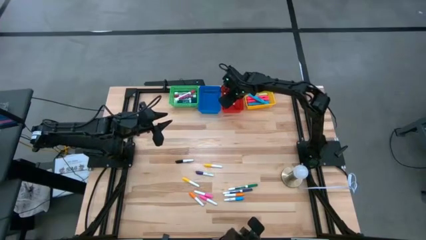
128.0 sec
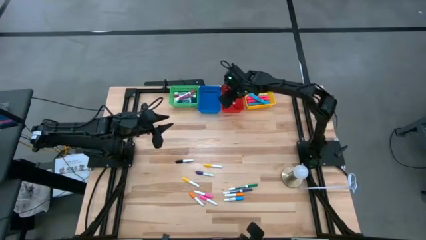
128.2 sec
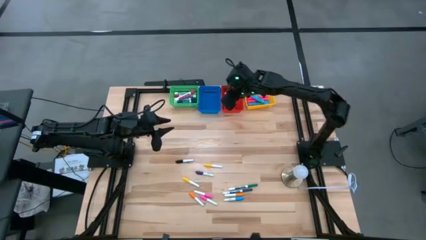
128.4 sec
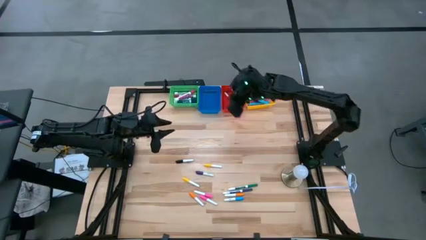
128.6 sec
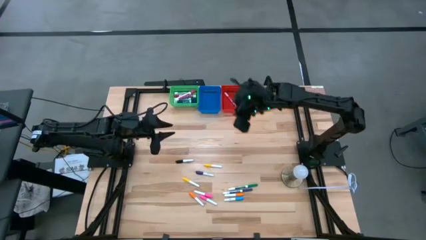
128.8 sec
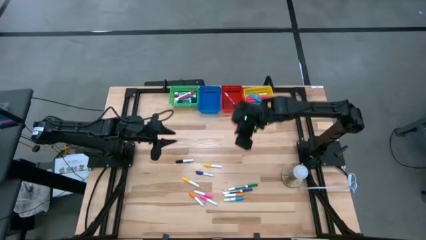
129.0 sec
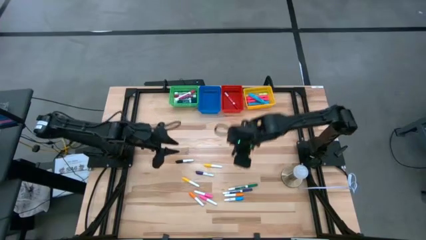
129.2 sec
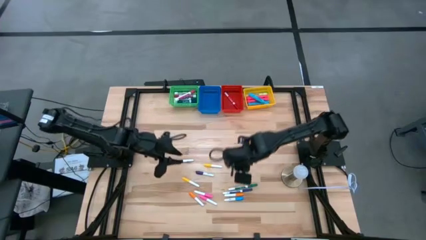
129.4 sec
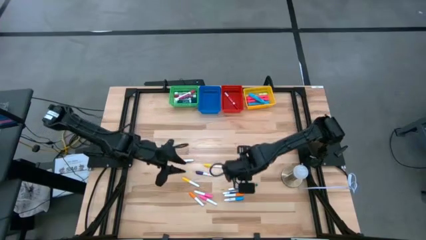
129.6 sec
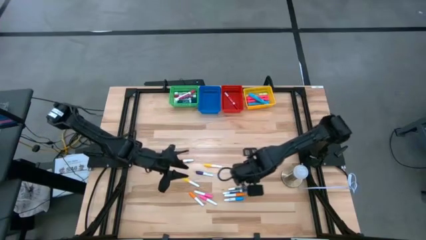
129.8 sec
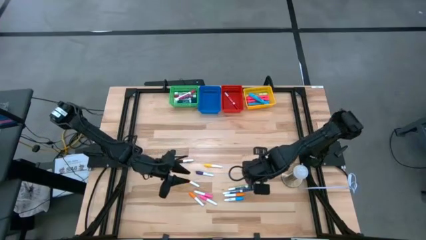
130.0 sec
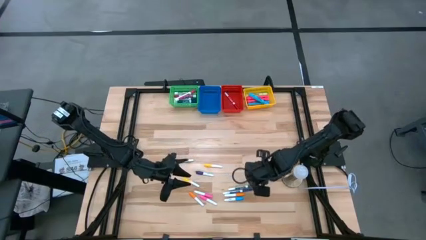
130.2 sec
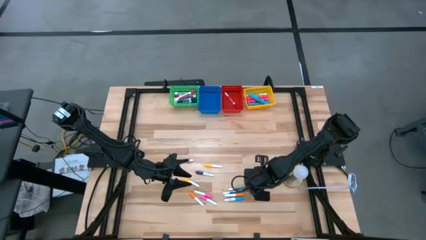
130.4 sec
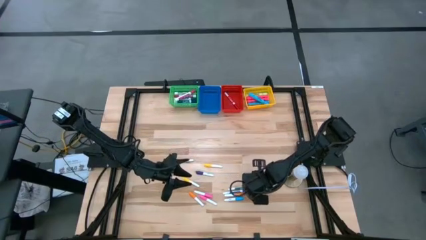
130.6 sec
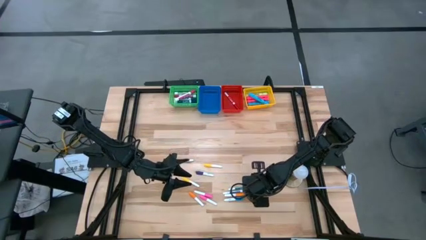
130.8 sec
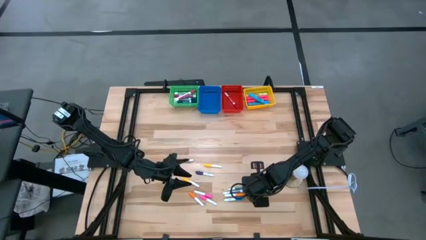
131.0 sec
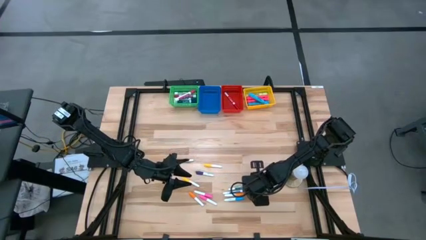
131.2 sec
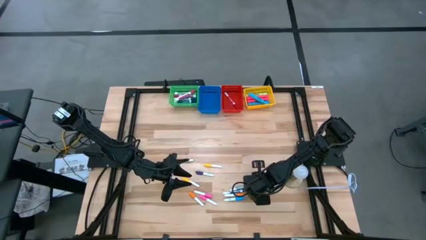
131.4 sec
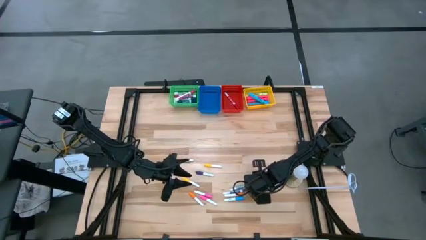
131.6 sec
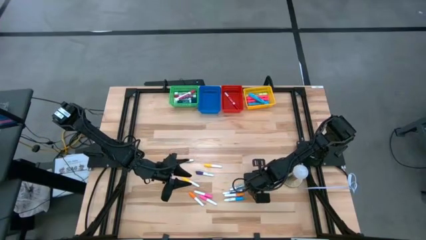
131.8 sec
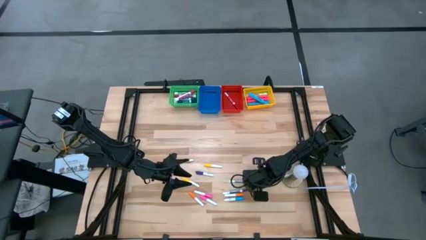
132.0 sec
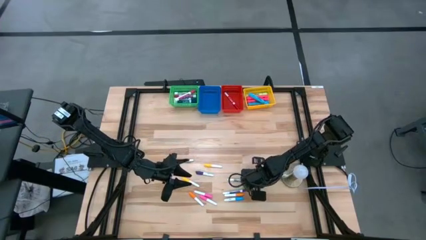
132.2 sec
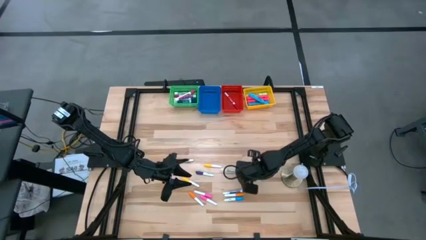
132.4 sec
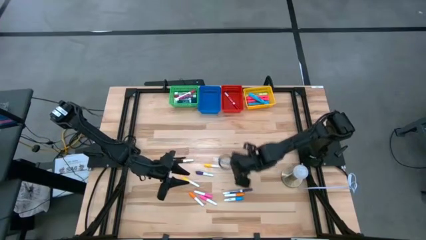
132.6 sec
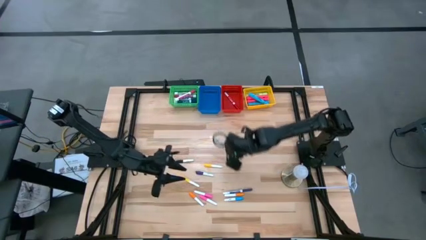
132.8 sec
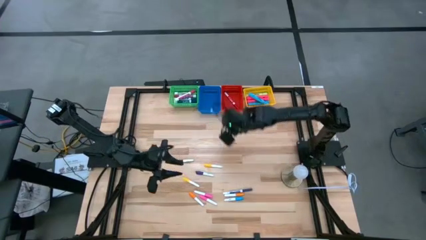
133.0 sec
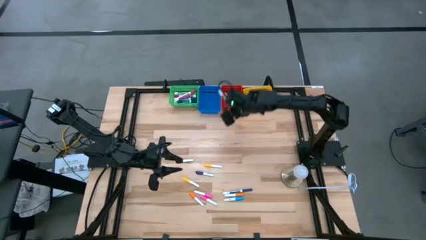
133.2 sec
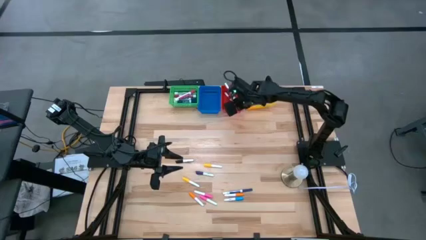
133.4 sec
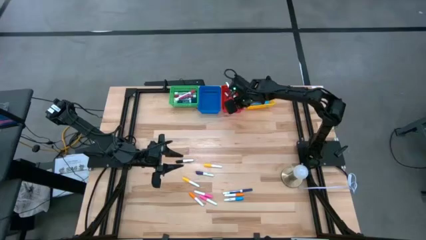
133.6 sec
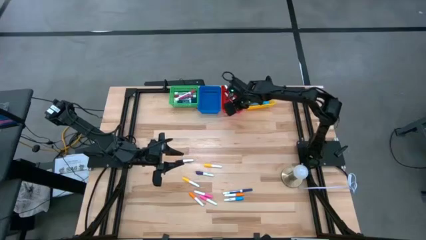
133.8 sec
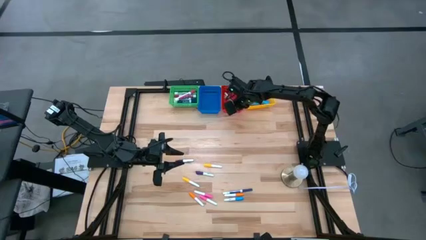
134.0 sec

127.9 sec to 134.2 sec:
Task: Pick & Place Markers
Put the small green marker pen into the red bin

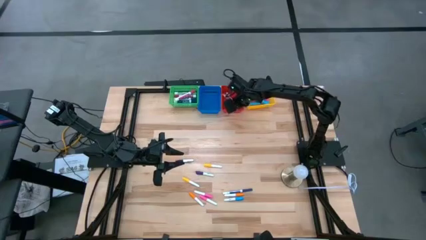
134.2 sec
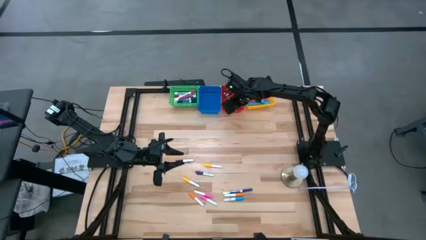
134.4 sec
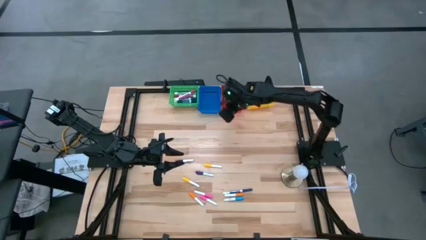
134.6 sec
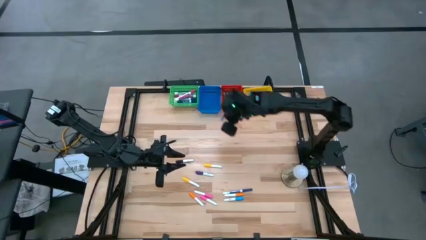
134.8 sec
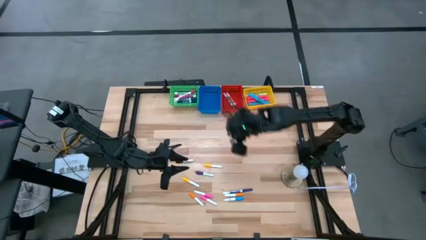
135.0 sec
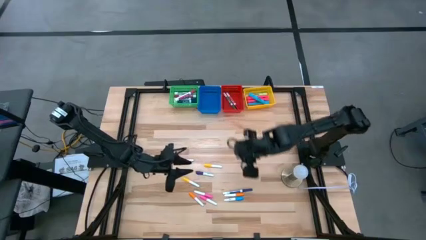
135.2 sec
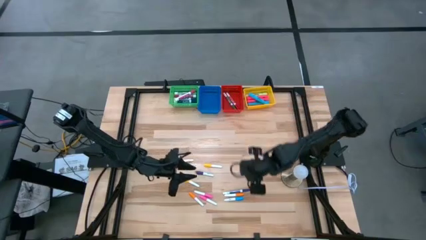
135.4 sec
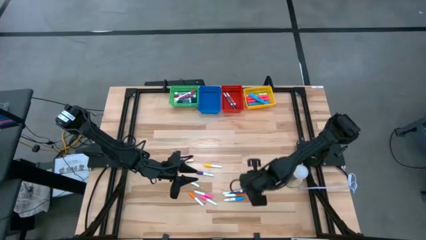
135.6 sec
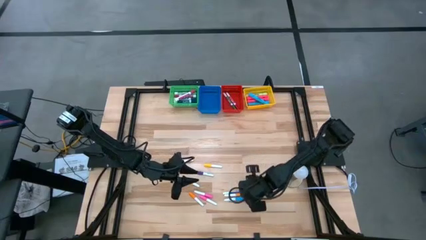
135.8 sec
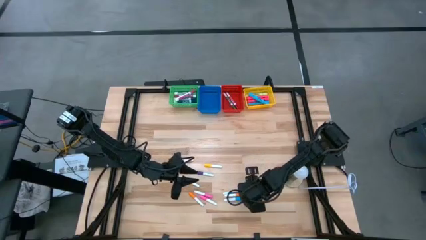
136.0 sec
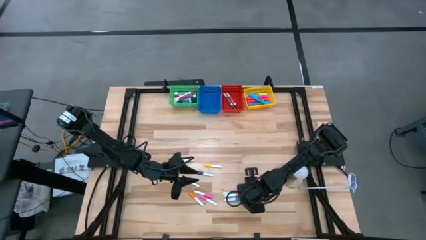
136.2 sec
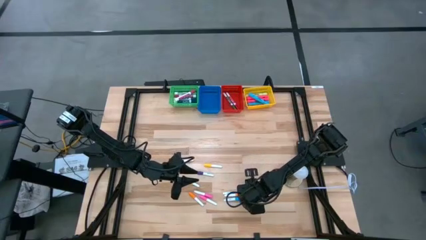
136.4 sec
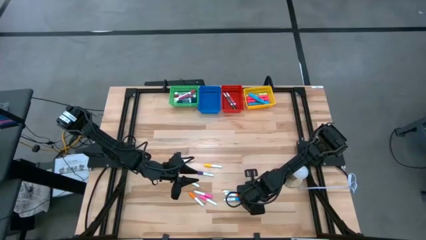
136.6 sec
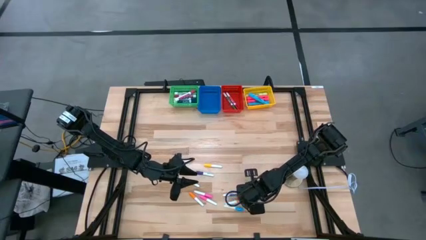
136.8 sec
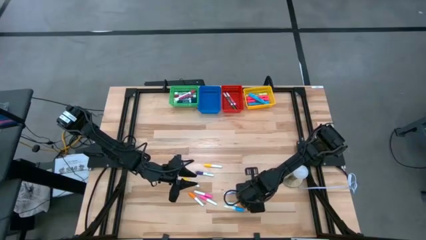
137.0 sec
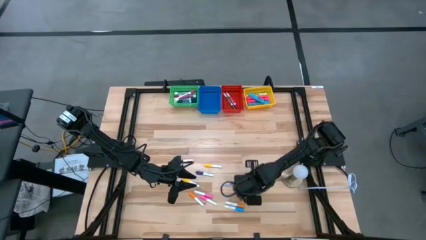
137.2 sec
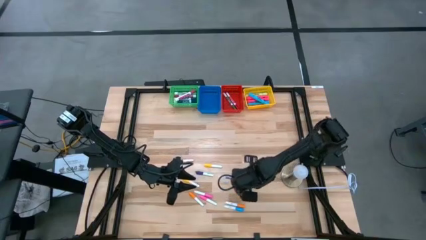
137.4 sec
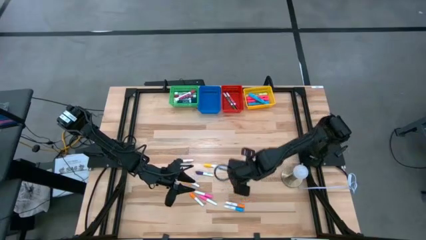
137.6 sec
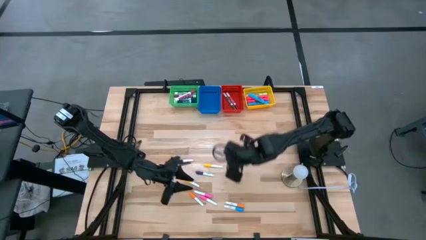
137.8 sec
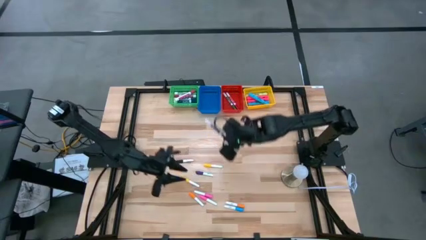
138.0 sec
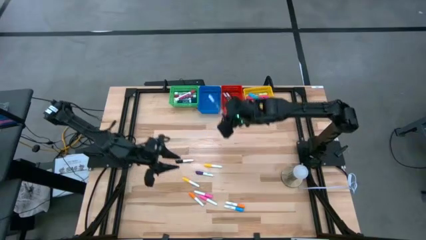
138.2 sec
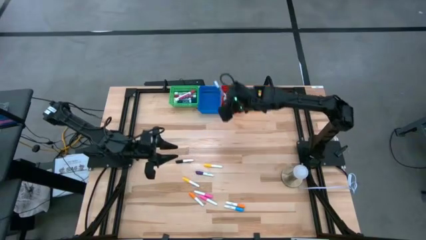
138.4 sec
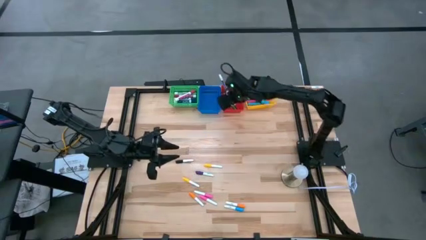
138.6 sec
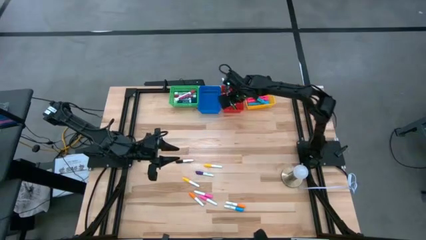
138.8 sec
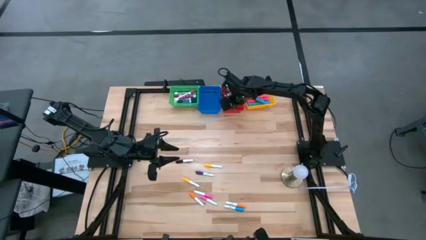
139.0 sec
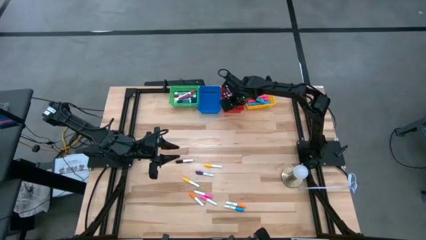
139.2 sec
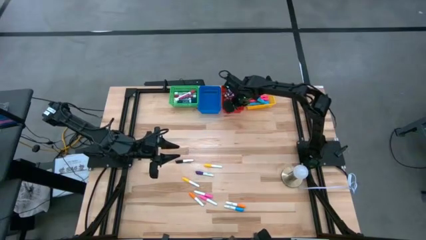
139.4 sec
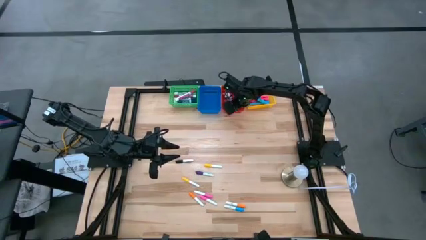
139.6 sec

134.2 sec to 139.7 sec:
Put the small violet marker pen into the red bin

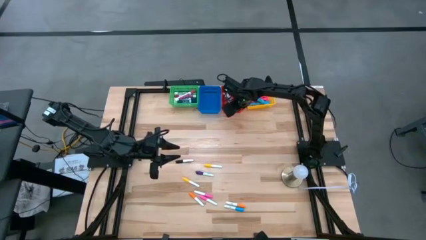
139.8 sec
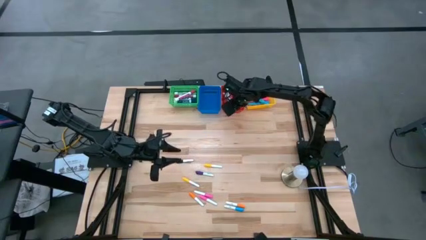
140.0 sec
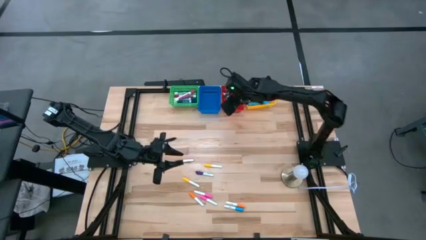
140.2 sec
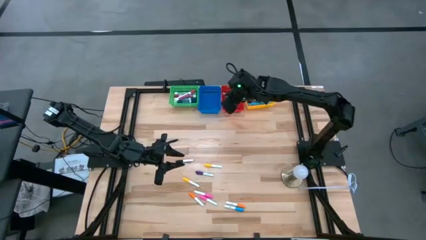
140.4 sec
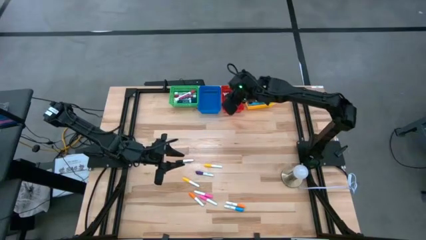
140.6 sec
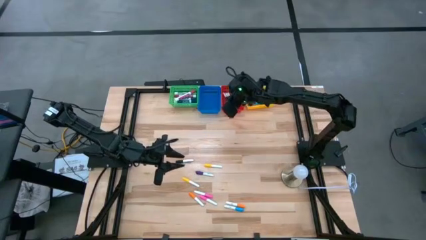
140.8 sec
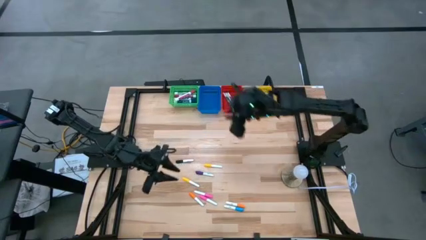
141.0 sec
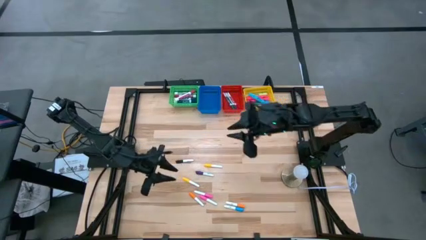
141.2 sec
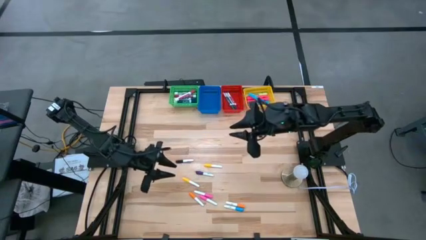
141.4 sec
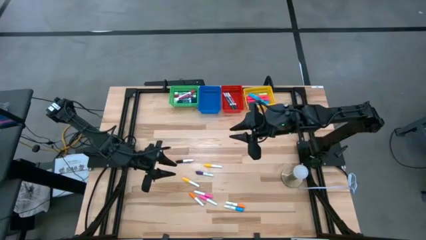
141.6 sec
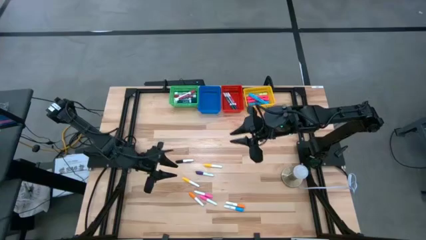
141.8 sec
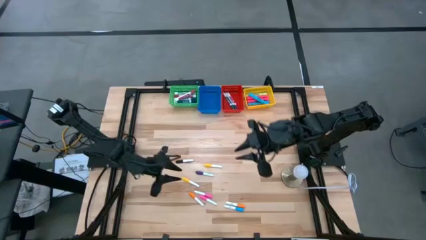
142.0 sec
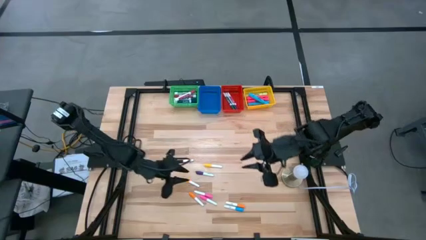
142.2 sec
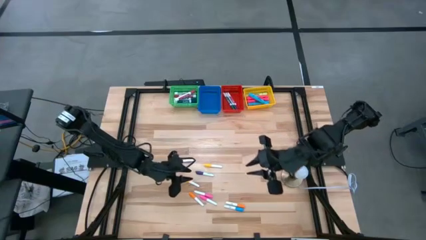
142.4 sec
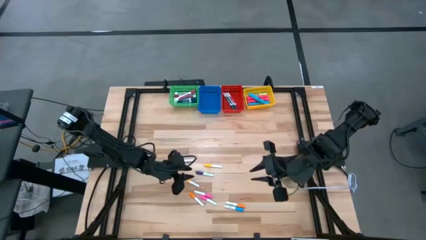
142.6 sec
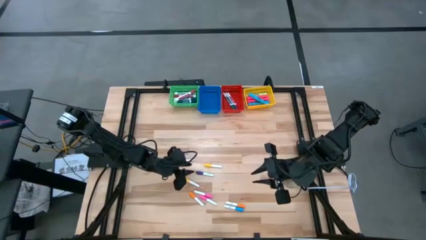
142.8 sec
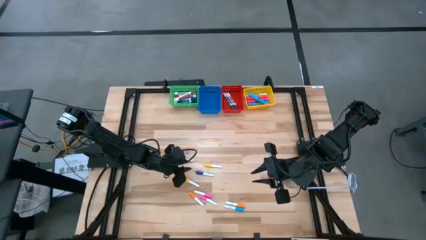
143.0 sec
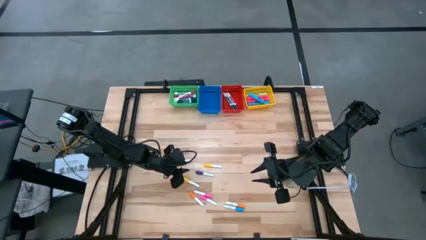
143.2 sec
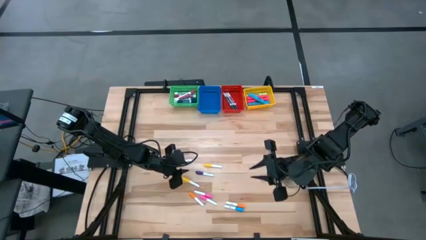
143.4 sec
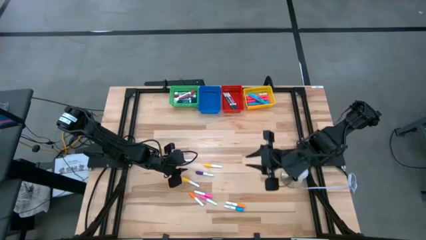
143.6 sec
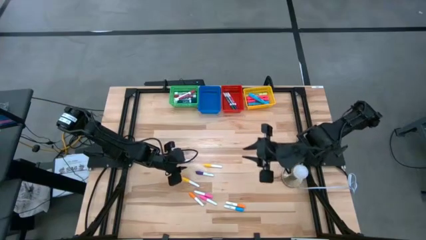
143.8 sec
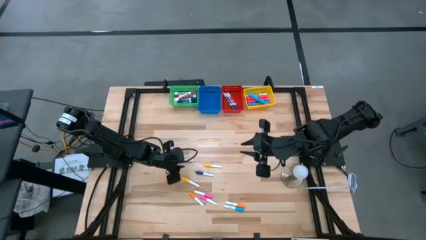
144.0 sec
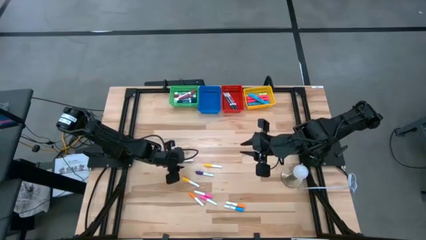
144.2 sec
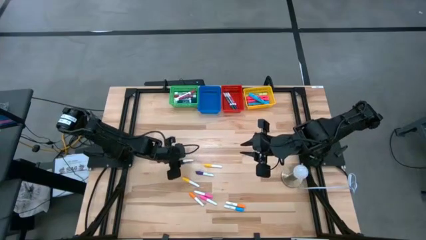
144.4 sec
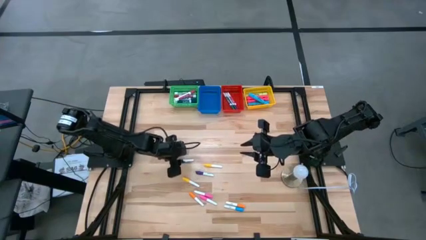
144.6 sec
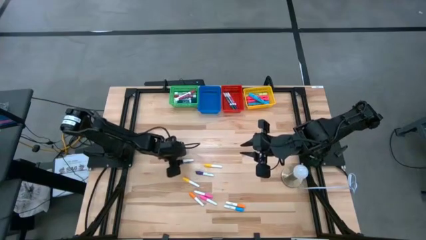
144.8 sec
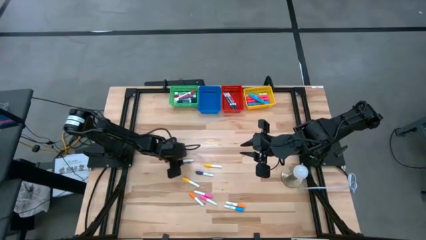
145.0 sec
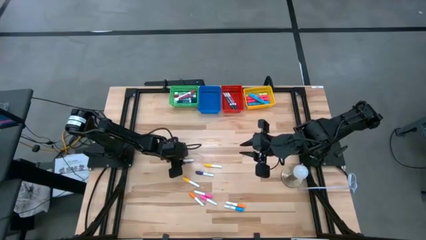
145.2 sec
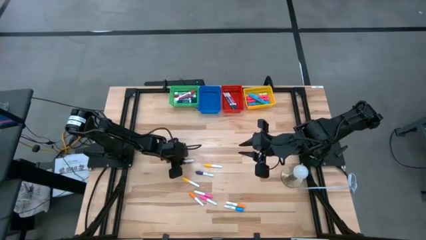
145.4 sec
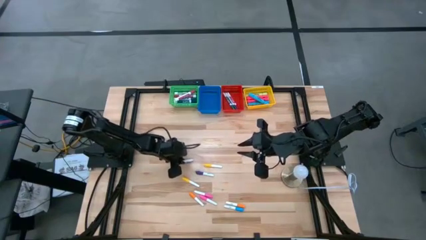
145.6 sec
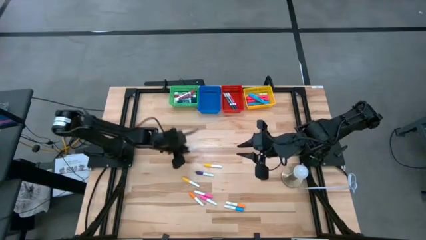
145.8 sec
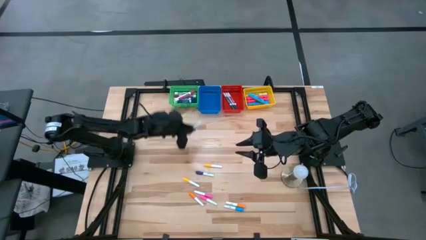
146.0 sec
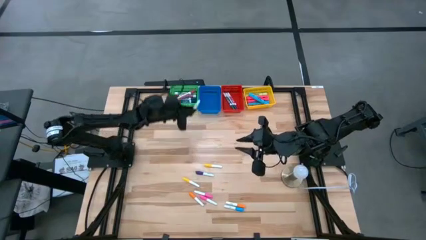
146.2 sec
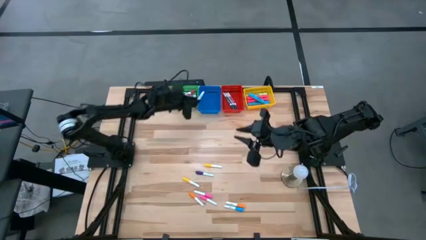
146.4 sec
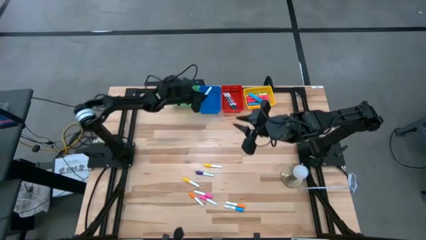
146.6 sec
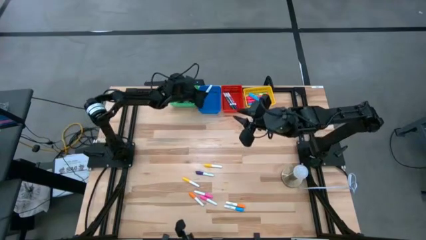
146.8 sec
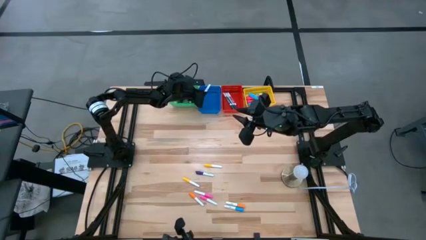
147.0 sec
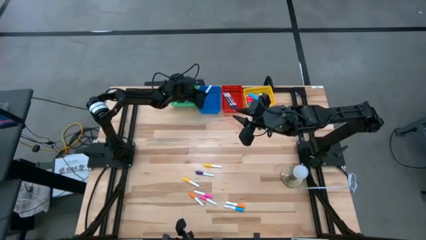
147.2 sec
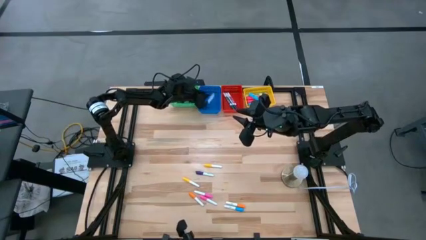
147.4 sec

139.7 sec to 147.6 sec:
Put the small black highlighter pen into the blue bin
